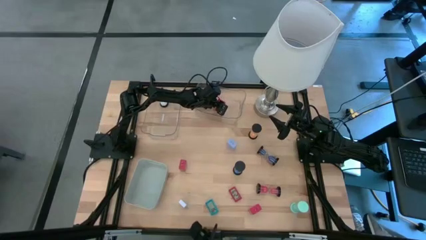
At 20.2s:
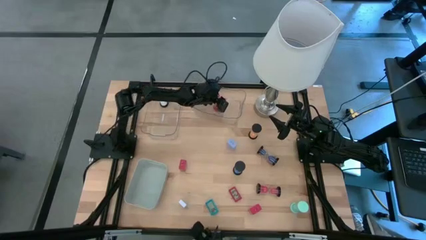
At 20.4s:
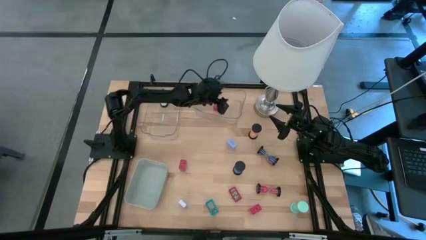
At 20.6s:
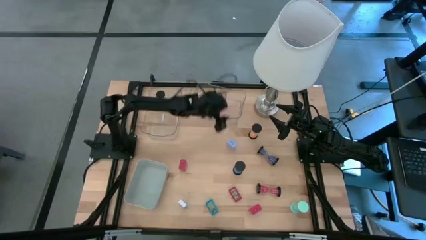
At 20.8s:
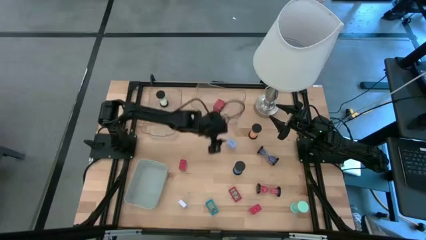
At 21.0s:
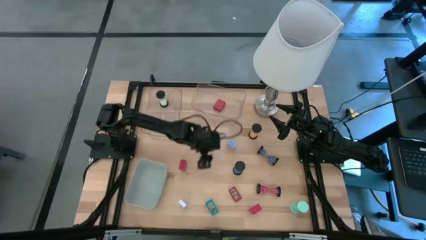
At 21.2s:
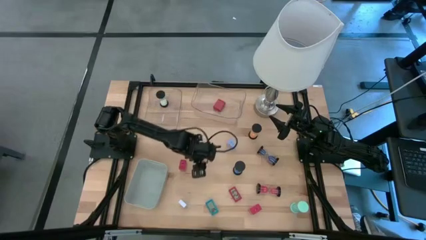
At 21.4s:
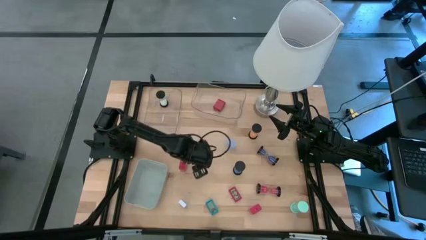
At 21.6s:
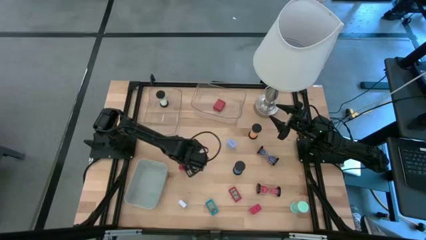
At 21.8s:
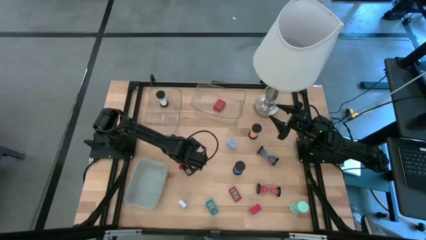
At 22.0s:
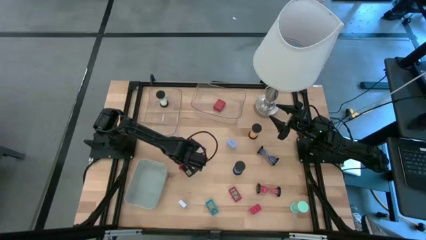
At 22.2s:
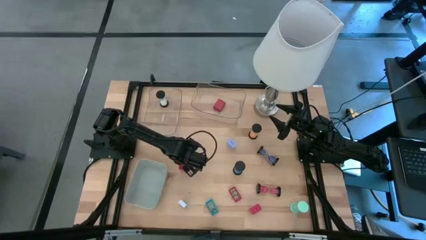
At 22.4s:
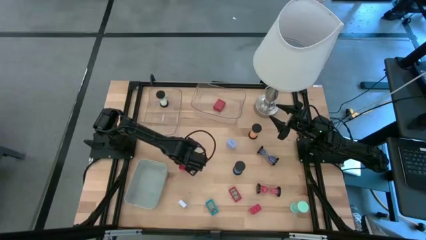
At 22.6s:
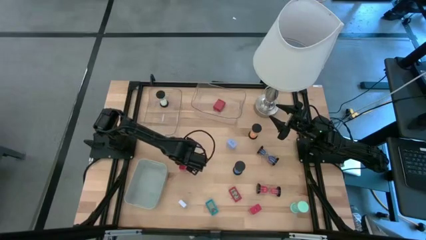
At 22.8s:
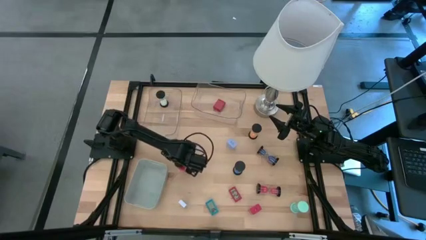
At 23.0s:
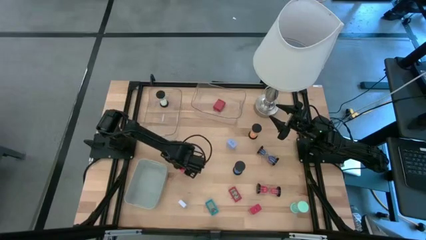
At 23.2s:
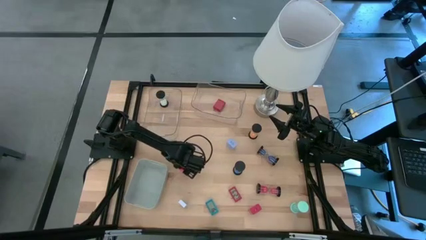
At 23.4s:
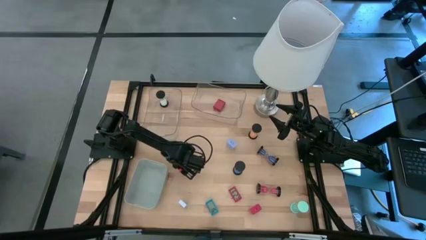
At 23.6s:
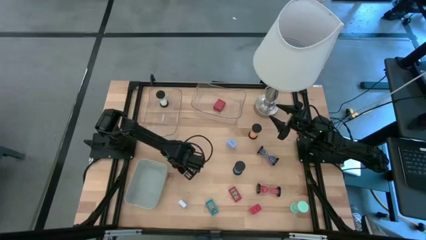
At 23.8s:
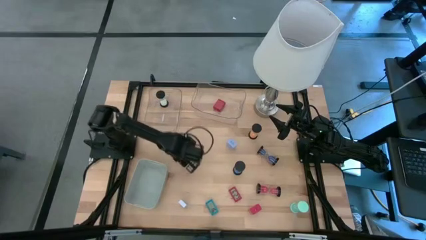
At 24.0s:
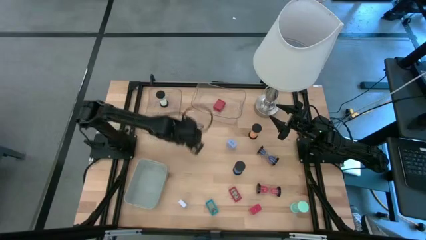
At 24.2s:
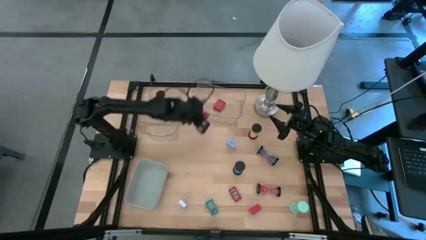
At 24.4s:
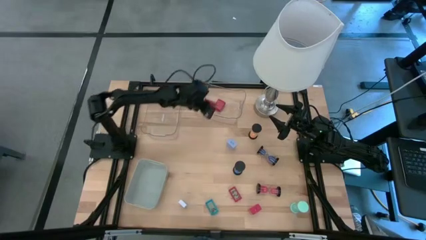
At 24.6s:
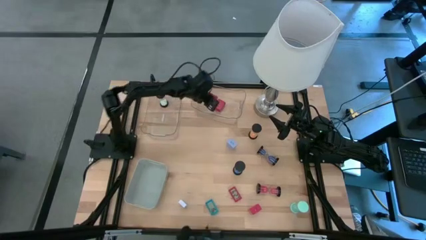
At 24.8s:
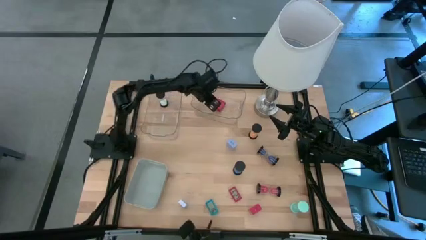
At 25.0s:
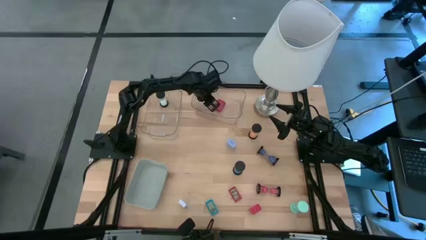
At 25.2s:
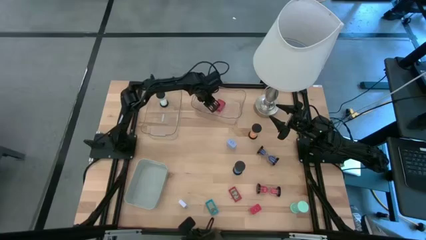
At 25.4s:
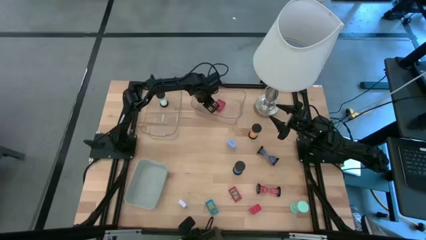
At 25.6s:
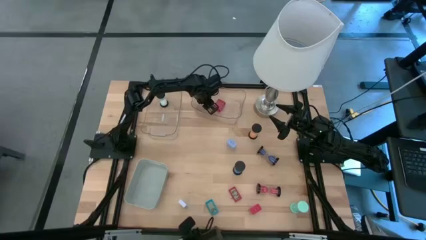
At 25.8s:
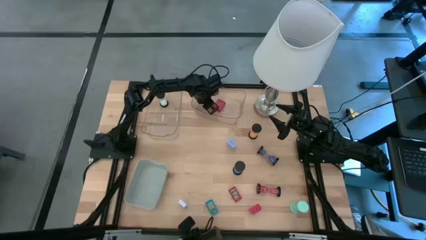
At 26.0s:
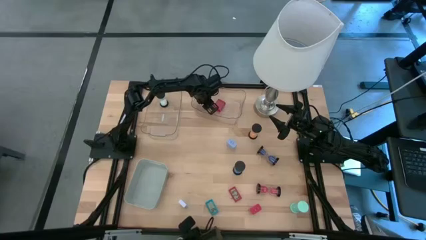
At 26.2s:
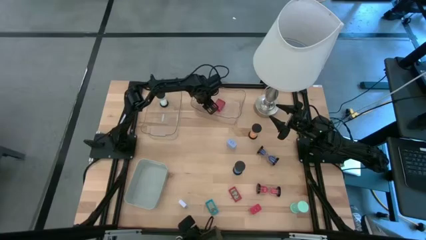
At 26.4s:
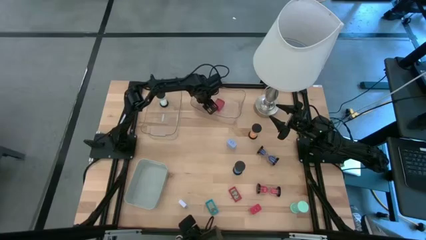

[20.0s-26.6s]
Task: Pick & Place Office items
Put the left red charger adapter into the right transparent bin

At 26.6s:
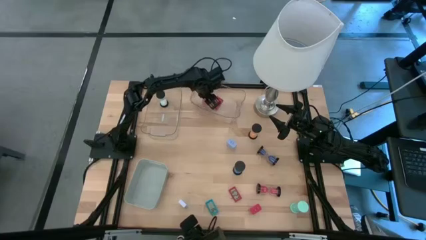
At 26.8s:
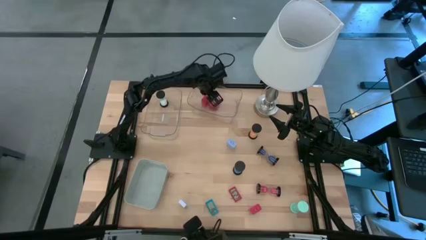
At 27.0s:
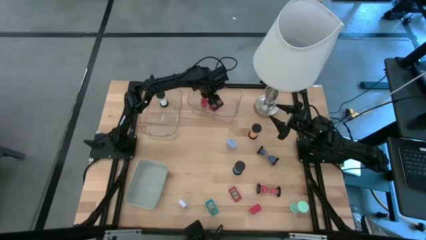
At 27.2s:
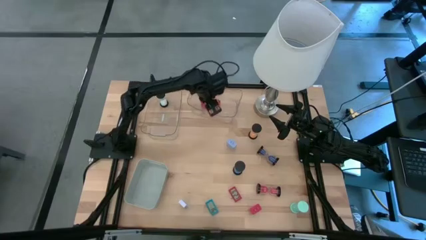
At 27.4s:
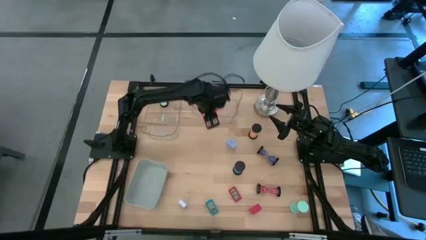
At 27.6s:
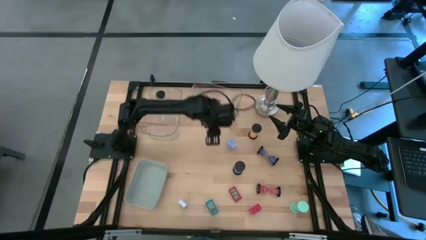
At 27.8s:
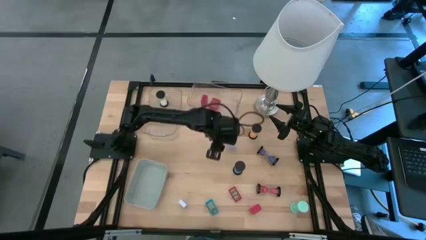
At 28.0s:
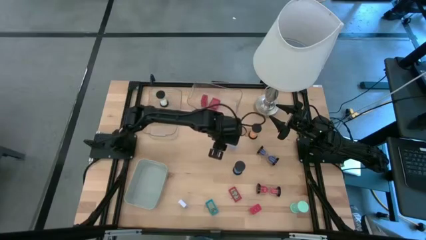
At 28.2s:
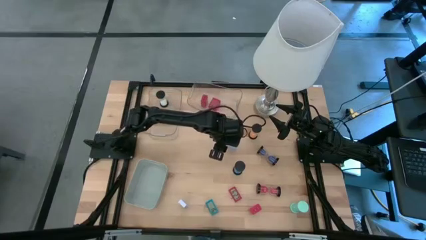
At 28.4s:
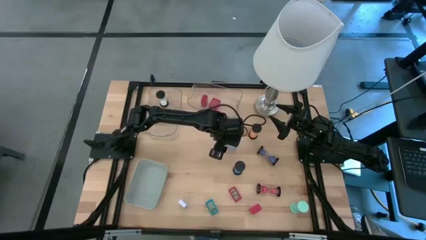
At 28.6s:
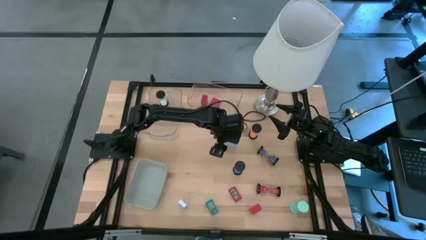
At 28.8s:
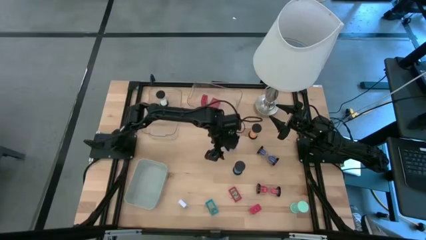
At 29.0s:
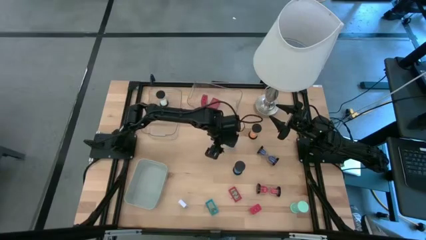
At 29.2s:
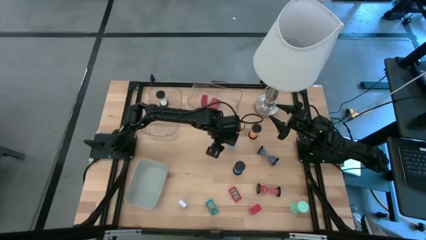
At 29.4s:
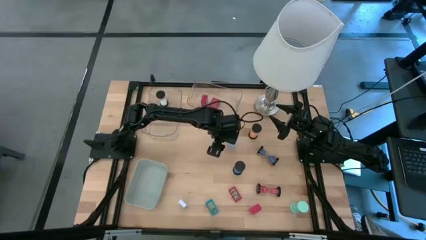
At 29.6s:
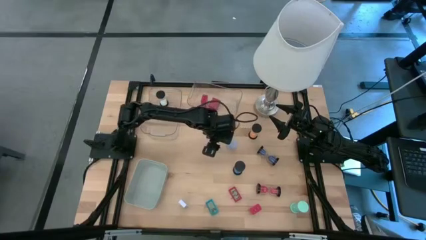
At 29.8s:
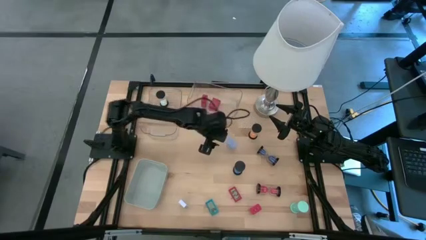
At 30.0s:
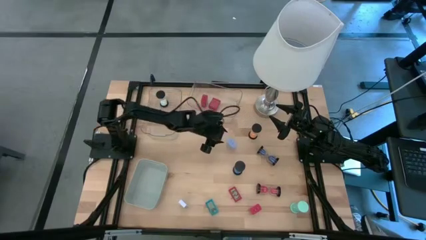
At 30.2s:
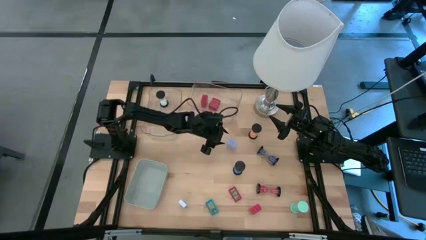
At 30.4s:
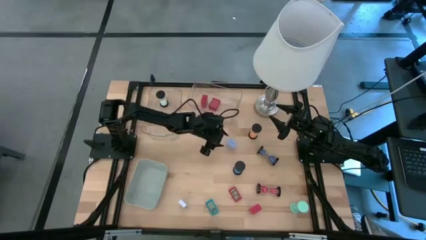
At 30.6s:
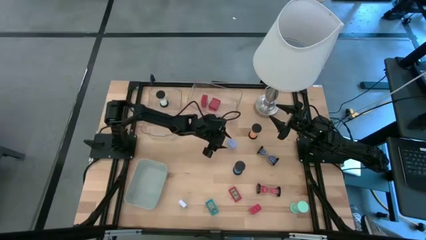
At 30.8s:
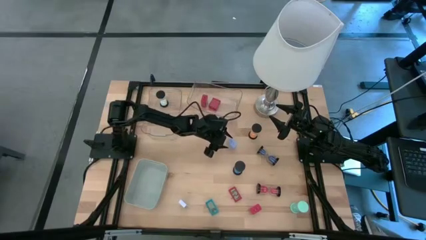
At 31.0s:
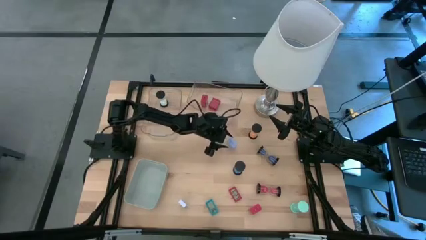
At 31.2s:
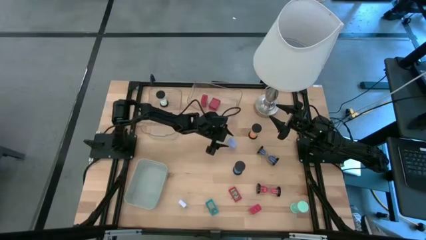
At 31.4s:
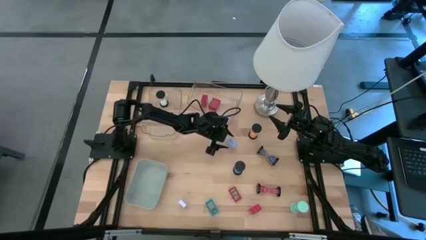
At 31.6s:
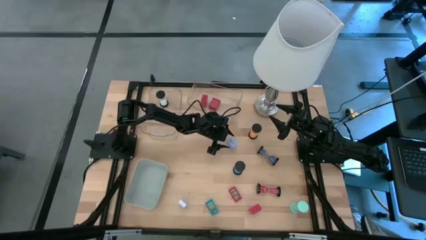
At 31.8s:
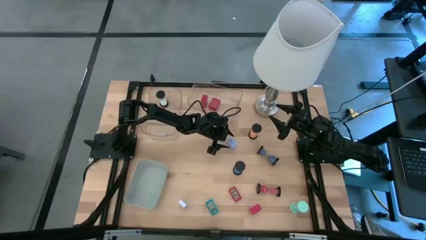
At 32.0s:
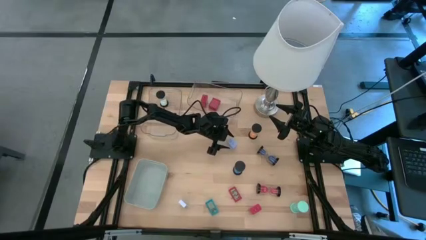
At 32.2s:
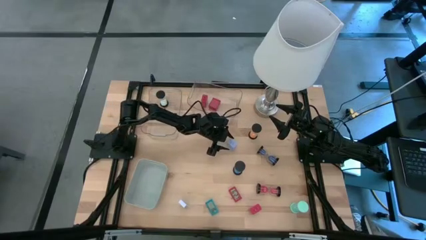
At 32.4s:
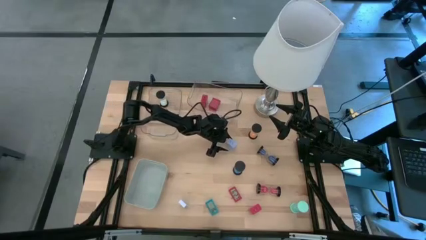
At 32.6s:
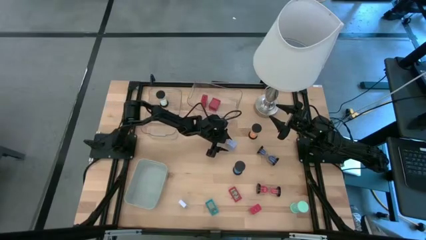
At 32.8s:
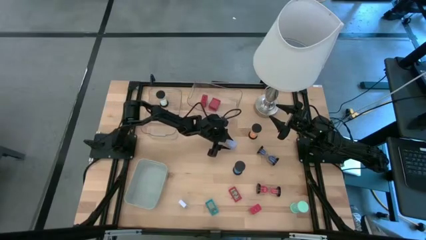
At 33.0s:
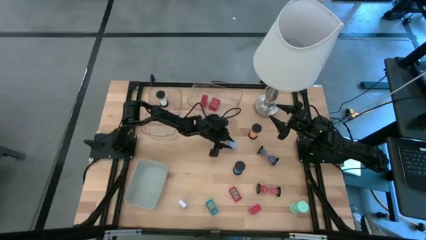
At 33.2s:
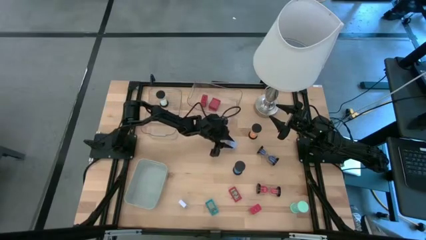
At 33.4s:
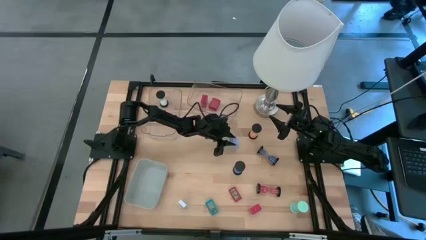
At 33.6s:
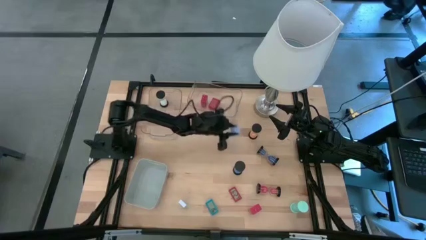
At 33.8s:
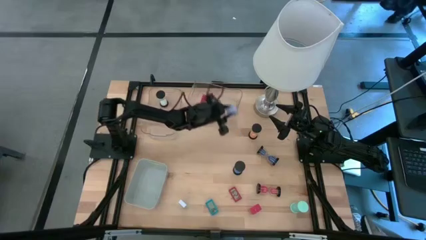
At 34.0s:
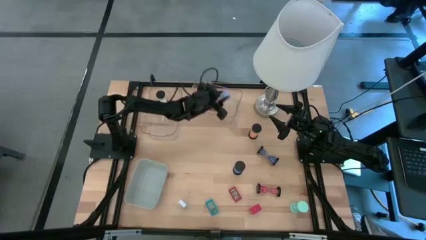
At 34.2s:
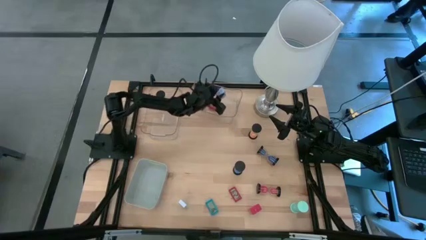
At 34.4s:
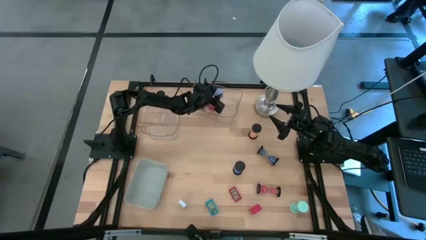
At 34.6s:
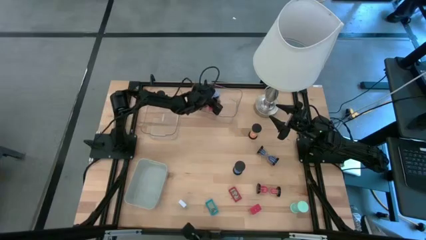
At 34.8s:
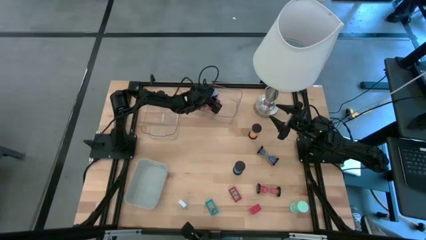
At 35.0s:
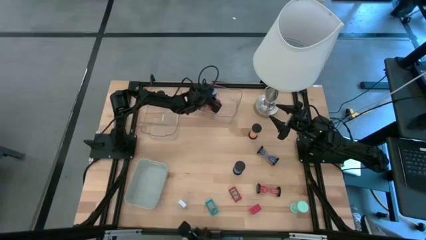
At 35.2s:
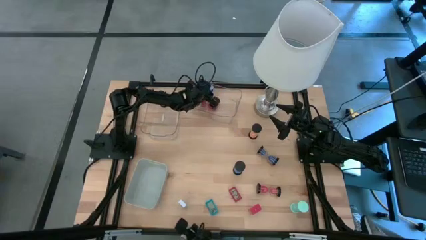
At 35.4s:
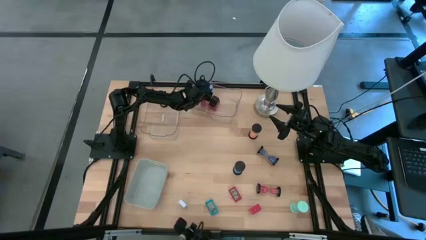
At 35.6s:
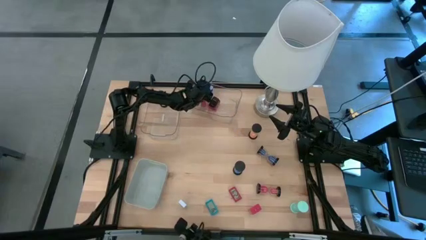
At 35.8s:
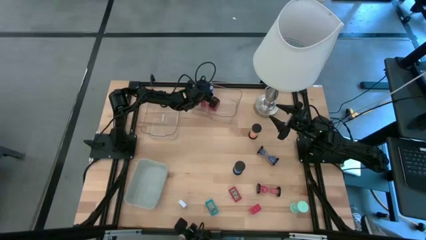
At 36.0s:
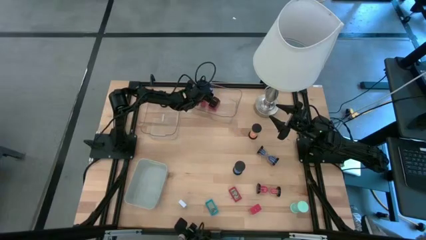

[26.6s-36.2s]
Put the violet charger adapter into the right transparent bin

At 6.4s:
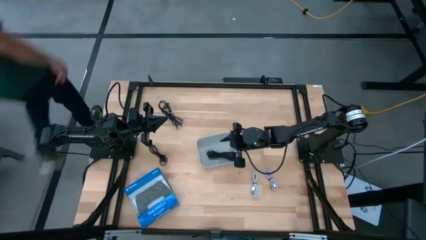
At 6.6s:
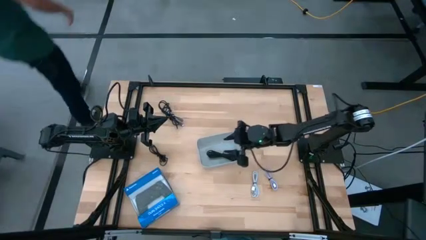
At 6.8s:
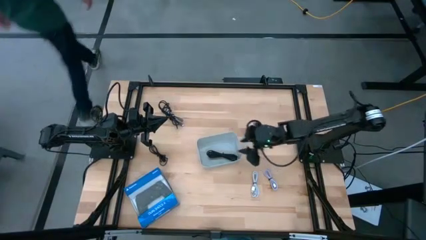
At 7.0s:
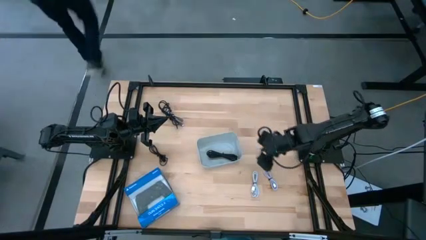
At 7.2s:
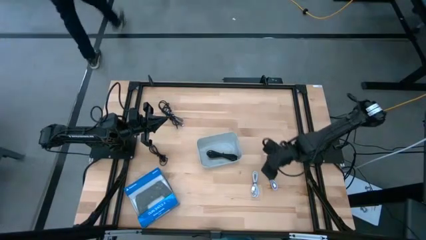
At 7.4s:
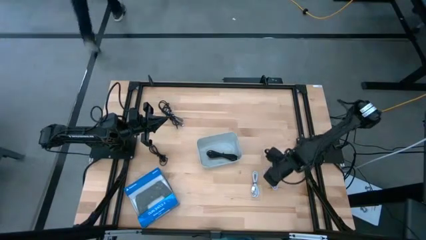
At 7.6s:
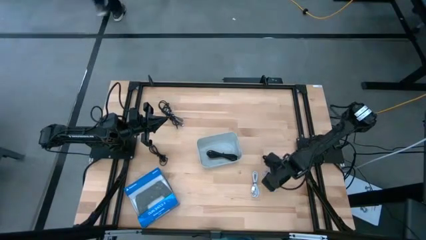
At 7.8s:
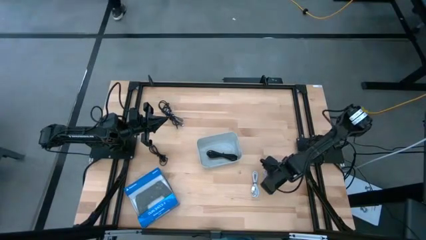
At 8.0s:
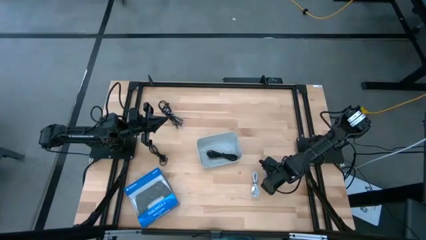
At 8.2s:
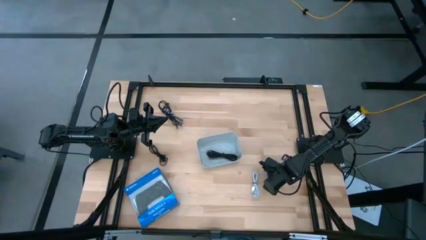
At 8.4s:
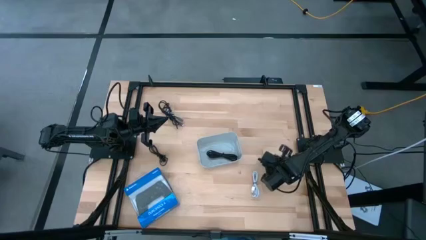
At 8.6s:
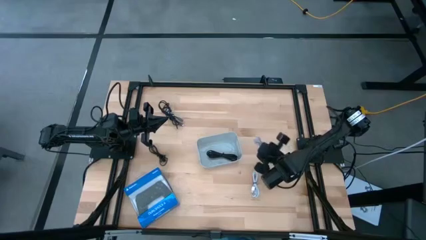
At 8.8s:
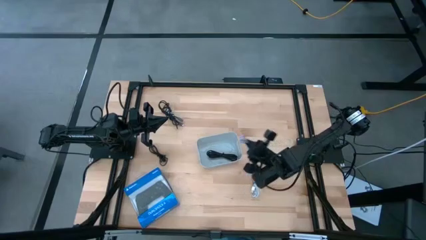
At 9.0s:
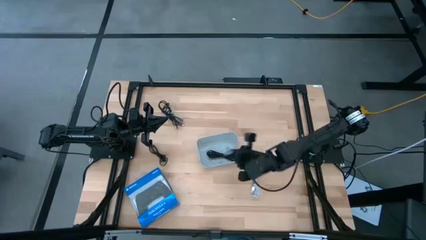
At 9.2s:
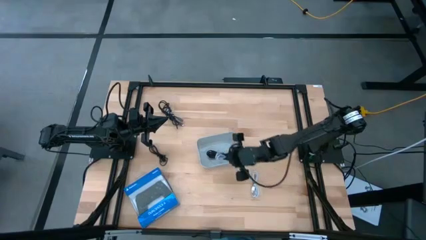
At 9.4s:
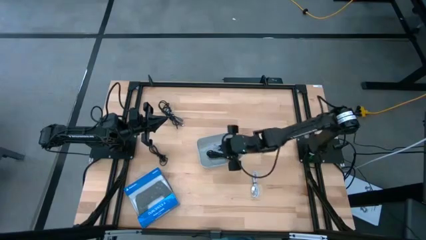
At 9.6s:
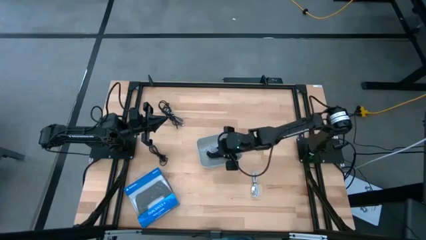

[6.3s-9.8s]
Task: Pick and place USB-C Cables
Put the right white charger cable into the gray bin
